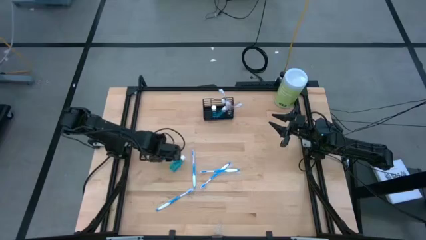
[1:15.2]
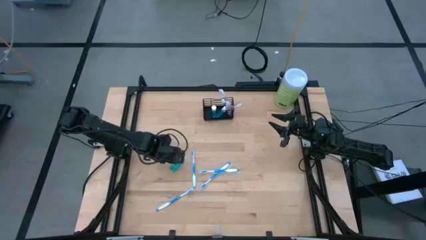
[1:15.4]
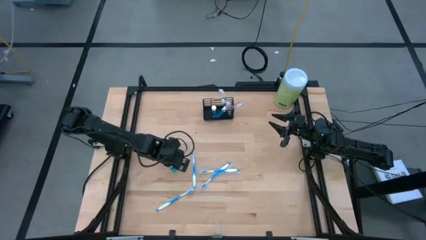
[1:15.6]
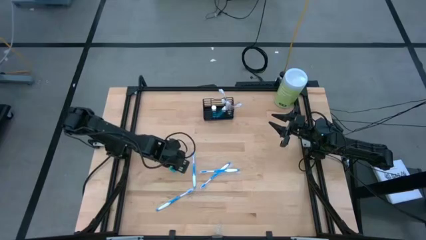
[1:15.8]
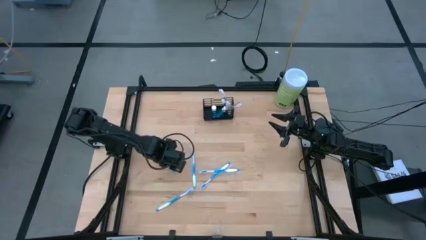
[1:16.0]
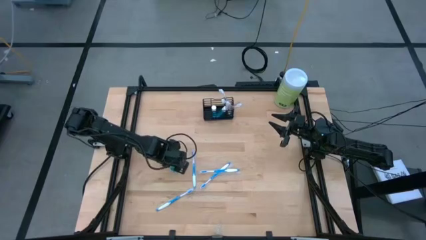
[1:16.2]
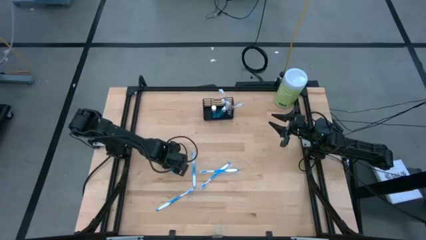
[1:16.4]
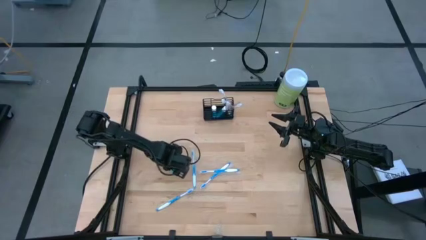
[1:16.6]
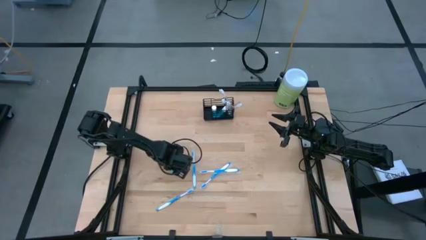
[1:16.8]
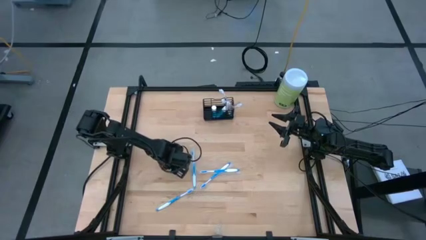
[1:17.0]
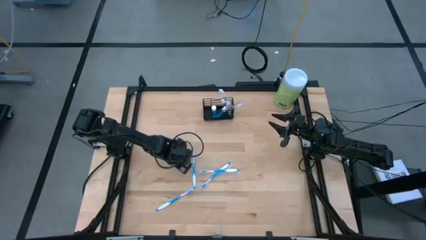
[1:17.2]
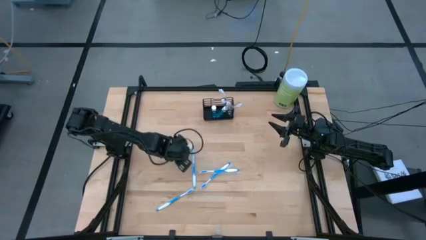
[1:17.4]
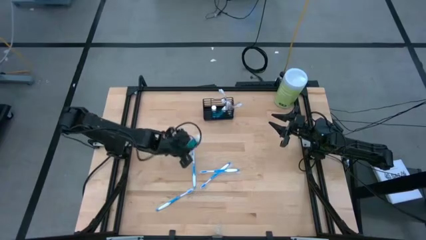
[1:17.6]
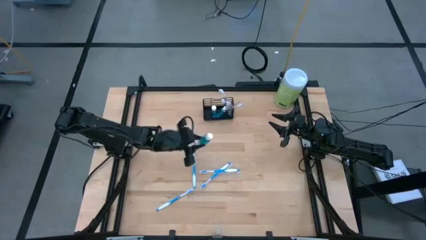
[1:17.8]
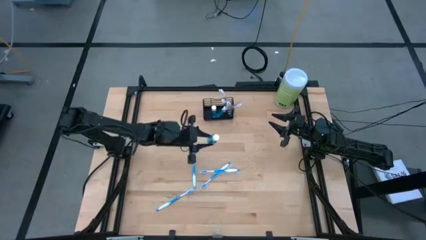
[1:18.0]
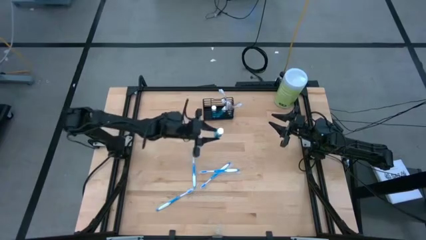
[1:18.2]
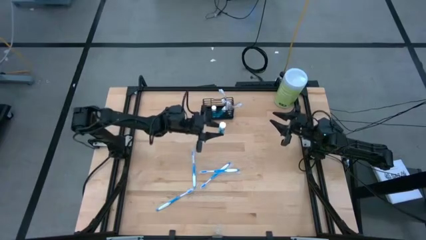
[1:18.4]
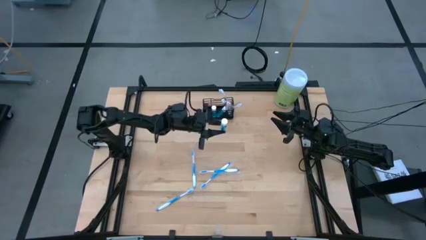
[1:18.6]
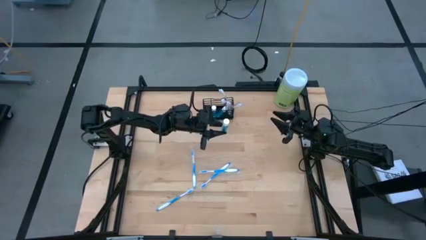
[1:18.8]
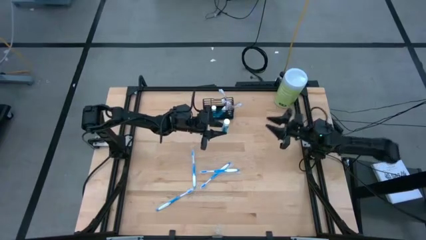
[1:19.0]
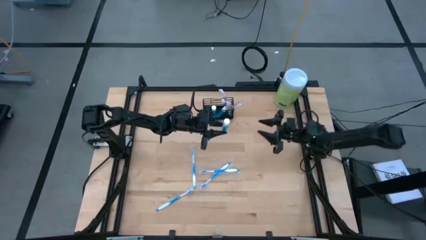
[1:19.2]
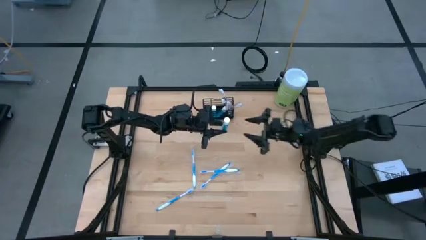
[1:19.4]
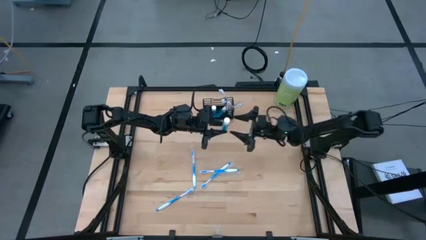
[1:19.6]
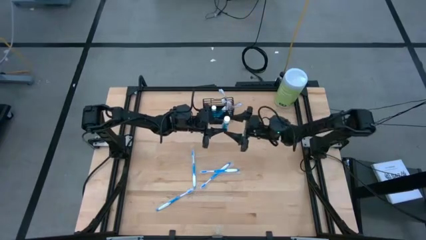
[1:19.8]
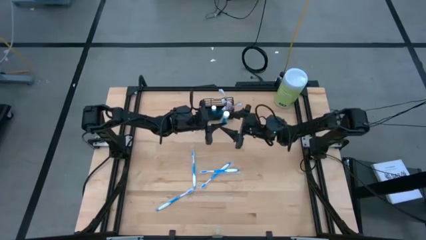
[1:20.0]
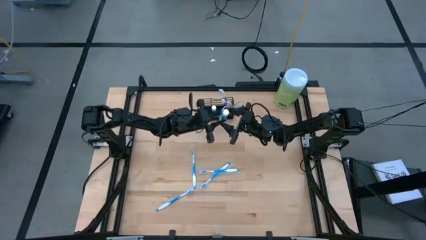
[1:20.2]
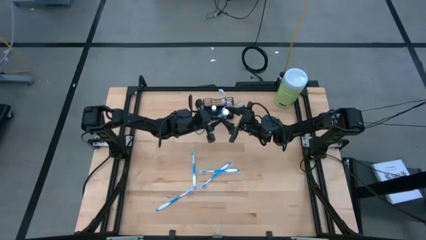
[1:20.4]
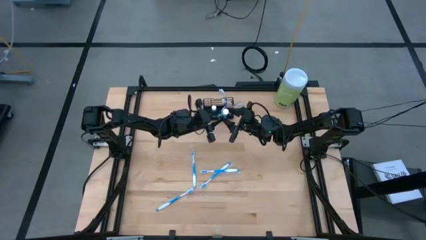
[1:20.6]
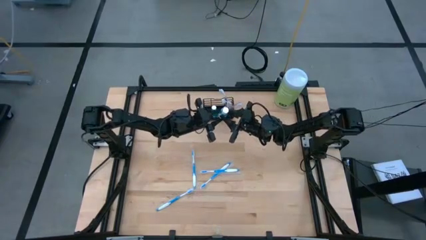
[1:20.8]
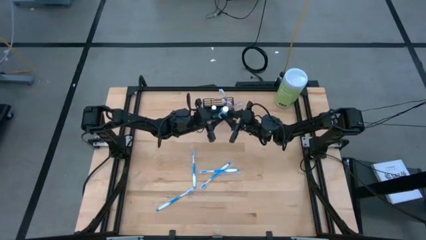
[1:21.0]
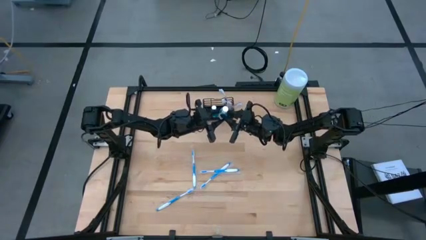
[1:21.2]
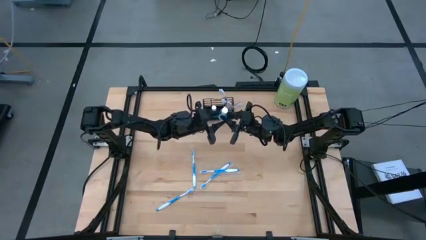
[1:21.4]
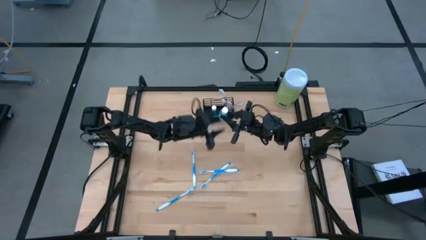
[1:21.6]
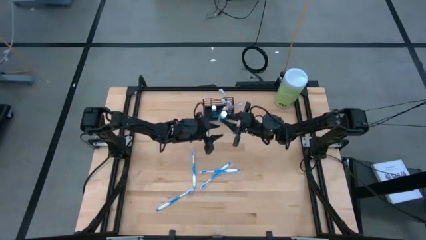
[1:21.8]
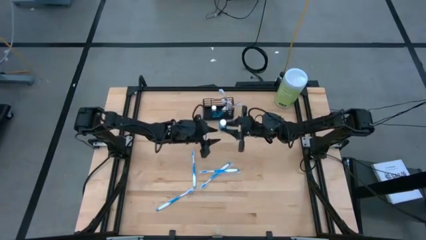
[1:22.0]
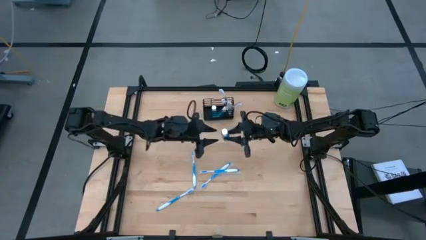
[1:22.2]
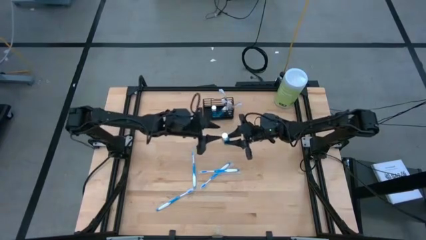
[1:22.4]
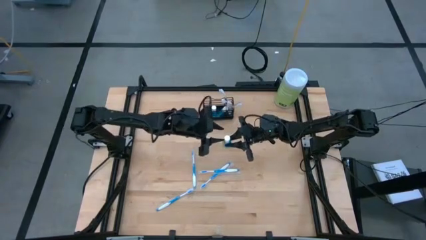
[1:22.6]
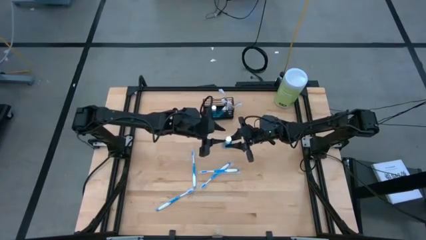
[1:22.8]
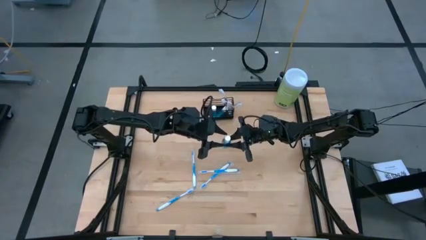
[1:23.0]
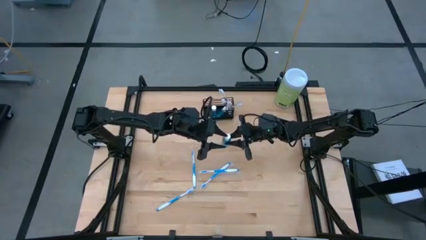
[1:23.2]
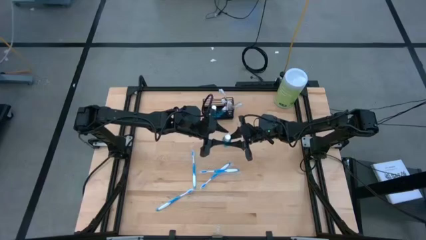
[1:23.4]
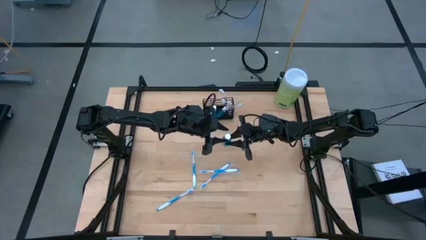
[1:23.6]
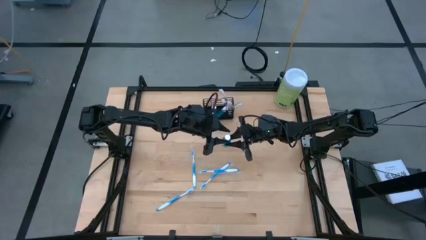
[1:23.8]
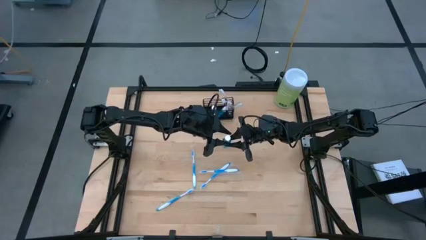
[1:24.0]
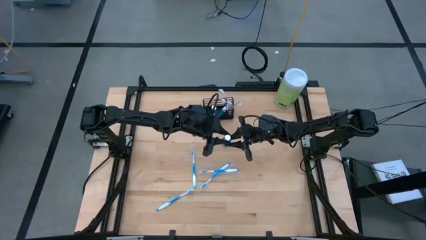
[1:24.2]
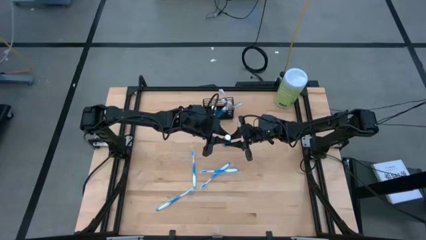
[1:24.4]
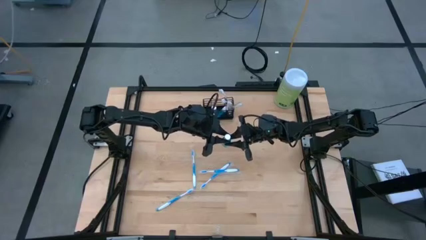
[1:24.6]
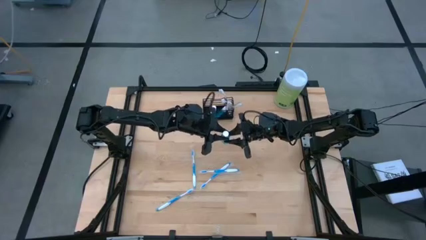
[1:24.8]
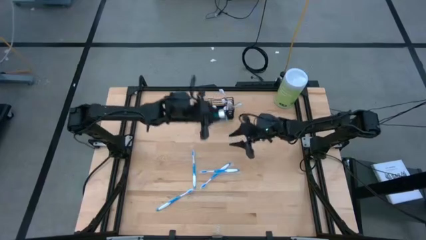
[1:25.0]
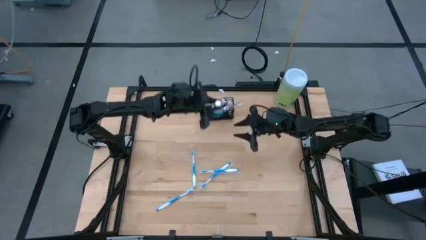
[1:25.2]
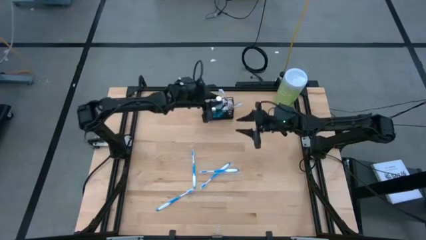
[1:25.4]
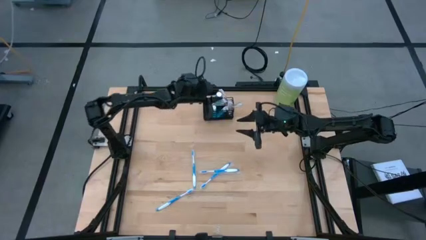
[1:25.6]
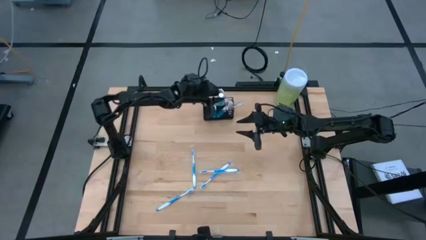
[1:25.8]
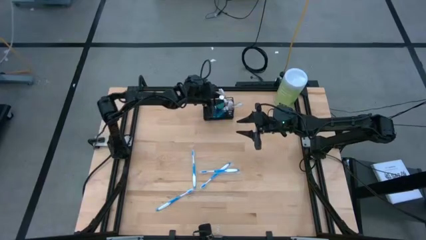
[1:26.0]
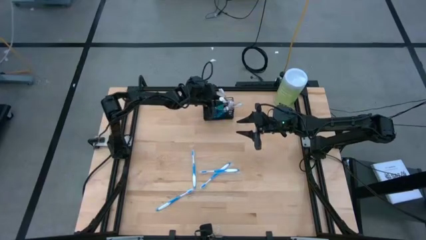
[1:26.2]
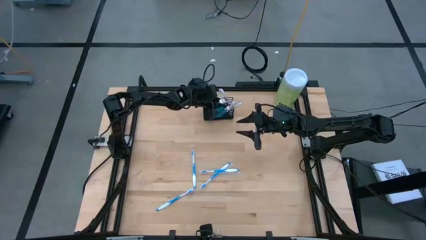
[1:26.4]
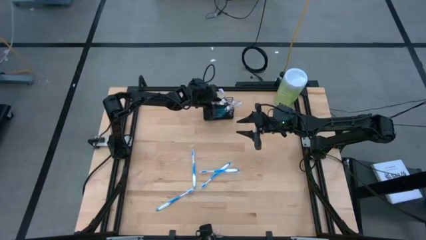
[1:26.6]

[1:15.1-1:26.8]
Task: Pick & Place toothbrushing station
Put the blue mouthwash into the middle compartment of the wire organizer

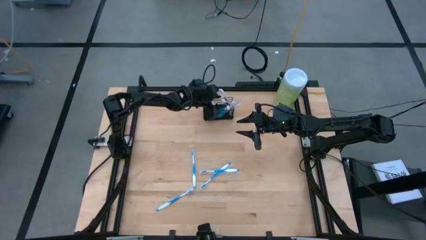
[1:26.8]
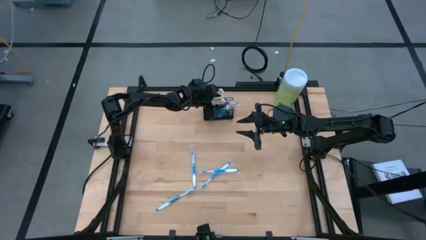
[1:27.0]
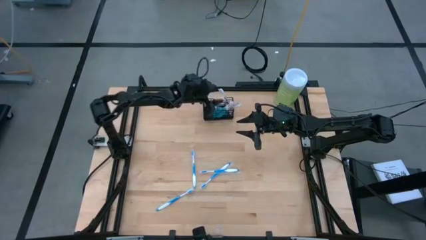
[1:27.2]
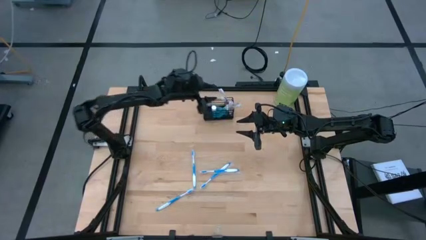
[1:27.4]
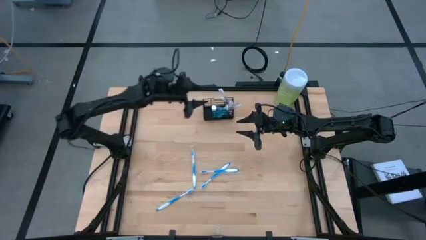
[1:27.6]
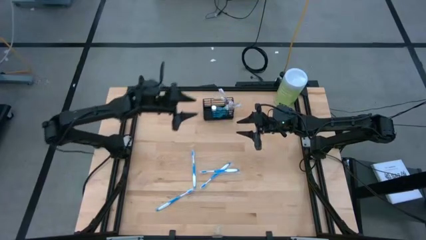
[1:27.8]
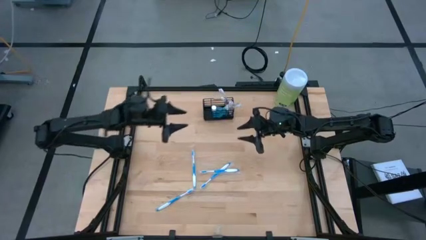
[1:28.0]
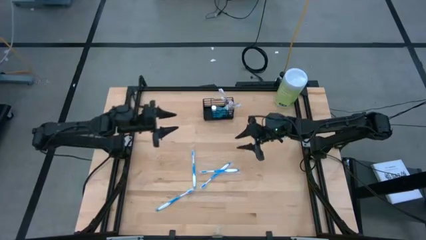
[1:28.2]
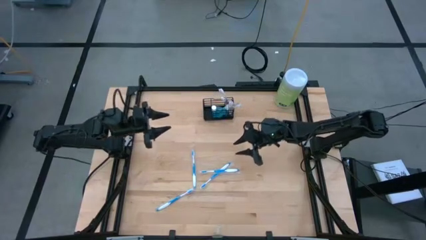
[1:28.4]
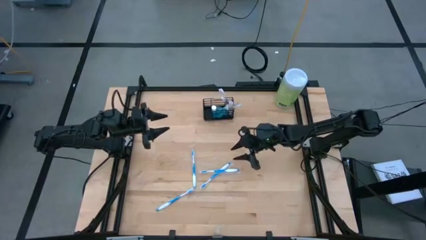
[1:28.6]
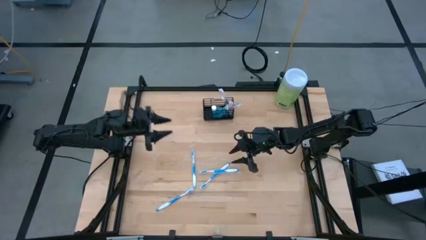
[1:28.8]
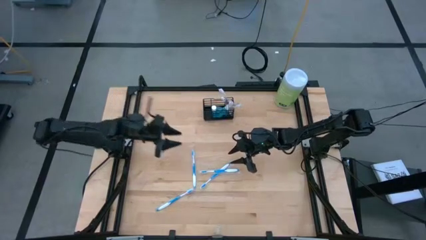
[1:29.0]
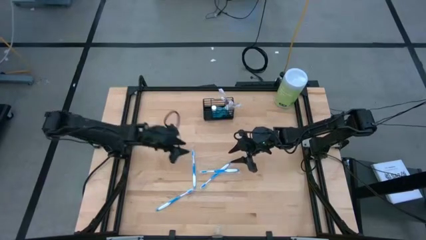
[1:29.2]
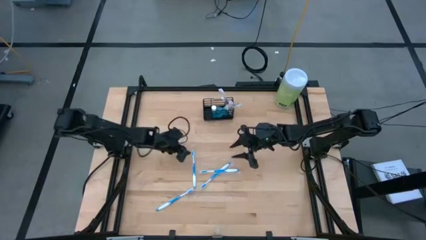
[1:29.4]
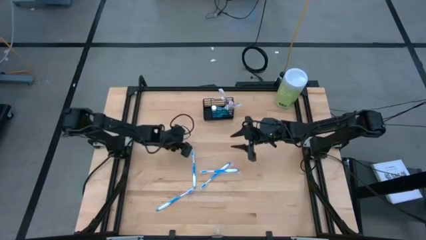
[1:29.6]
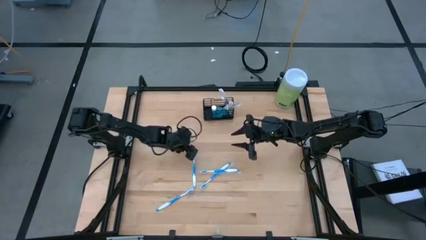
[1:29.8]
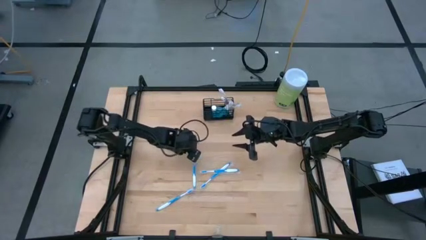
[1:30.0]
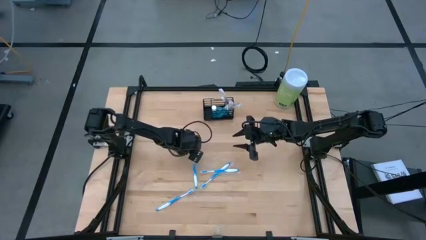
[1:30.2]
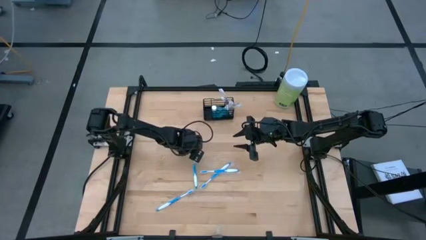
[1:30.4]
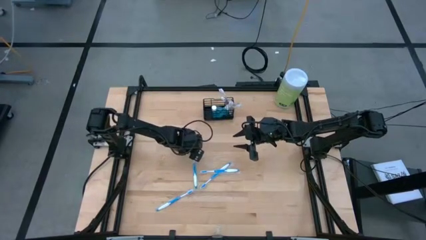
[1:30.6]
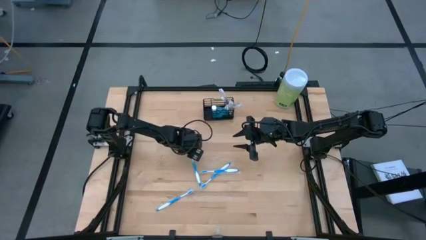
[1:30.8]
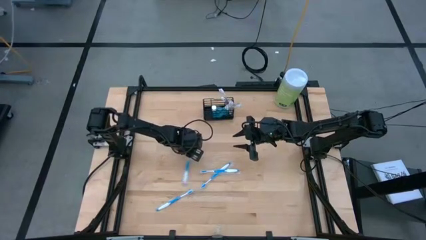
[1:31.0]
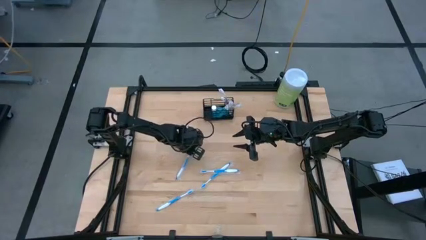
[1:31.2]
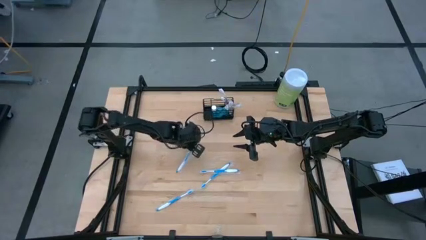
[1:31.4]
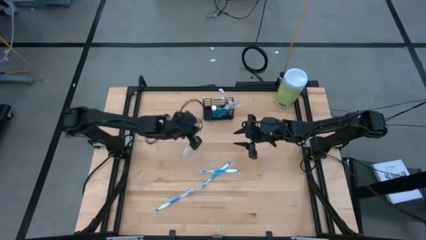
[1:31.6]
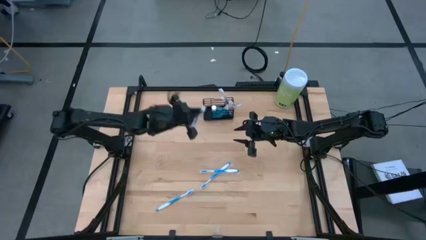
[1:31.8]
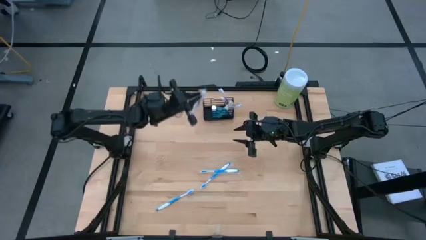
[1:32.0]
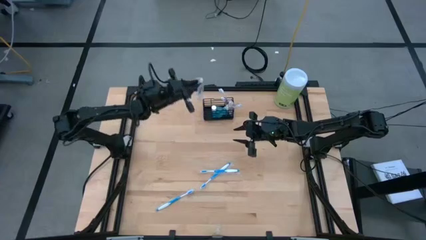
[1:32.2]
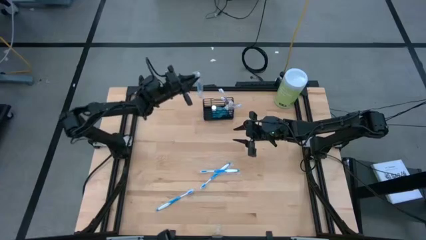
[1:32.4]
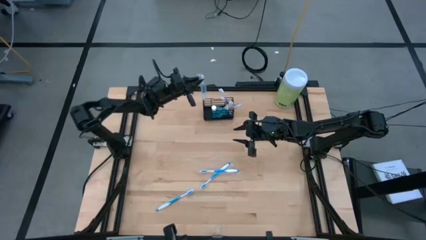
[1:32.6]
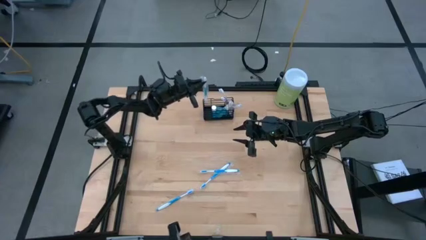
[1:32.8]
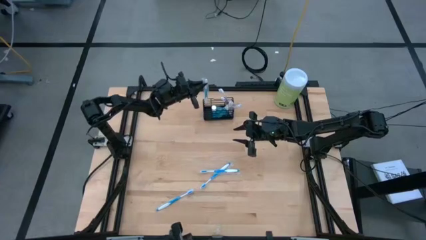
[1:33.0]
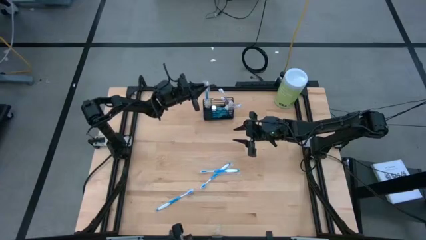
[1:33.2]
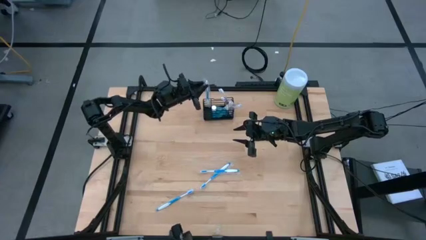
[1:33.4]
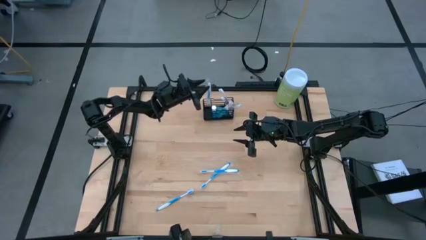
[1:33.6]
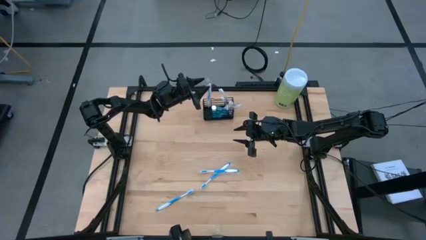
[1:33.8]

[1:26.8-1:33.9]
Put the blue toothbrush into the left compartment of the wire organizer
